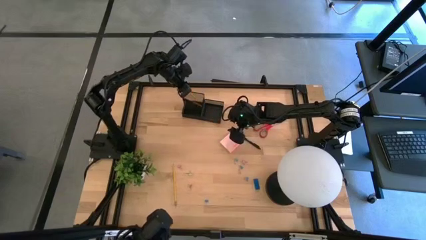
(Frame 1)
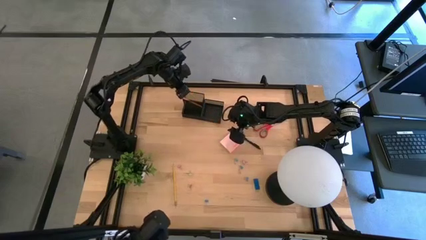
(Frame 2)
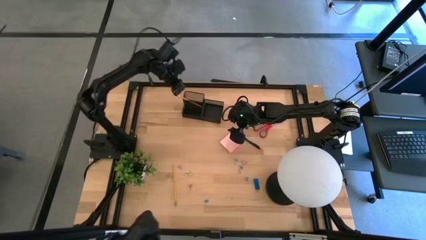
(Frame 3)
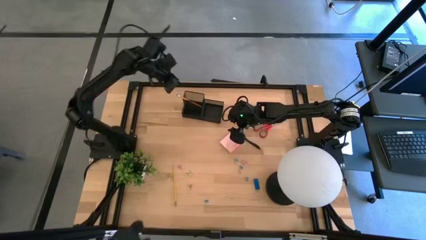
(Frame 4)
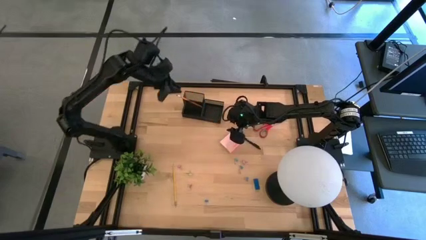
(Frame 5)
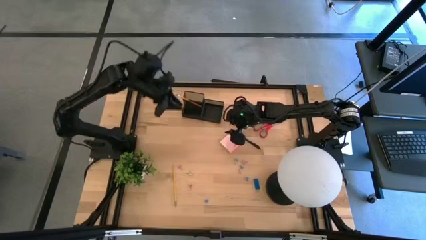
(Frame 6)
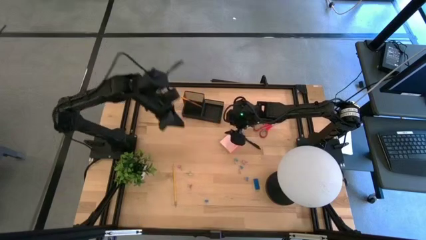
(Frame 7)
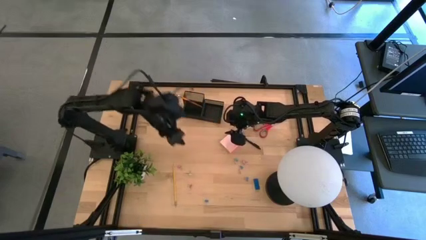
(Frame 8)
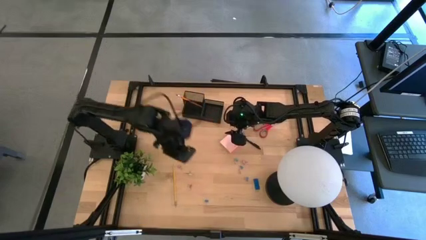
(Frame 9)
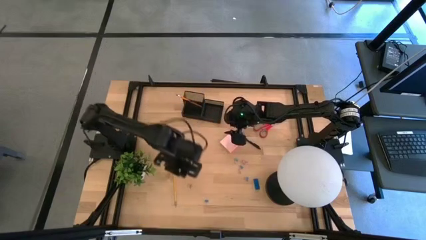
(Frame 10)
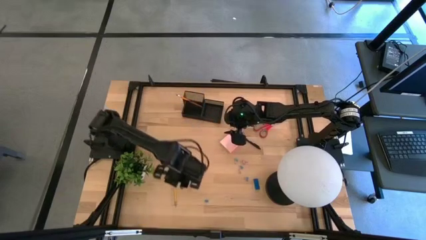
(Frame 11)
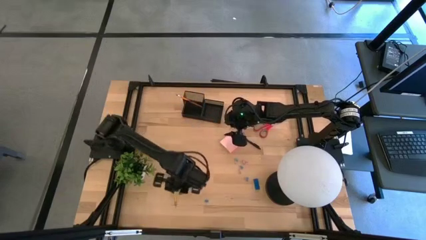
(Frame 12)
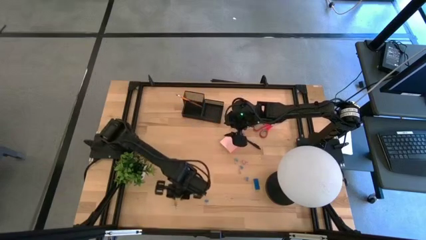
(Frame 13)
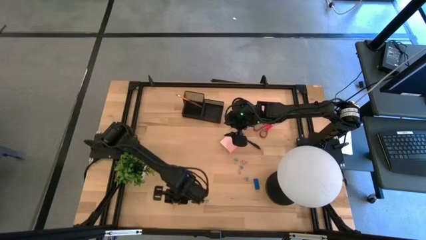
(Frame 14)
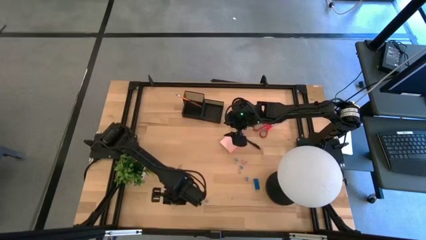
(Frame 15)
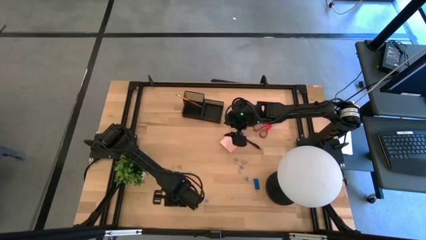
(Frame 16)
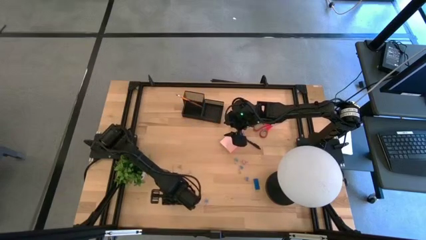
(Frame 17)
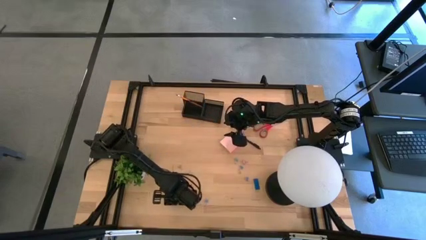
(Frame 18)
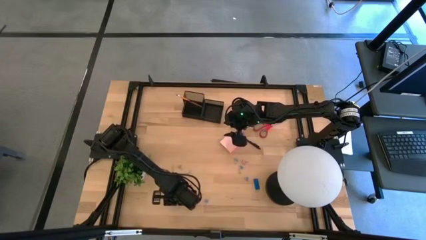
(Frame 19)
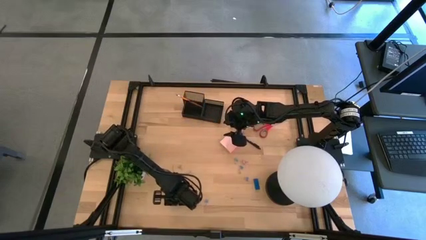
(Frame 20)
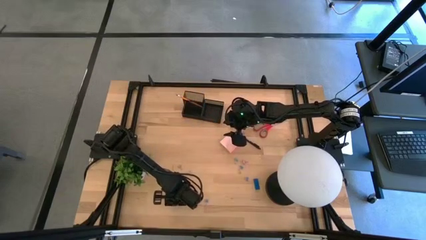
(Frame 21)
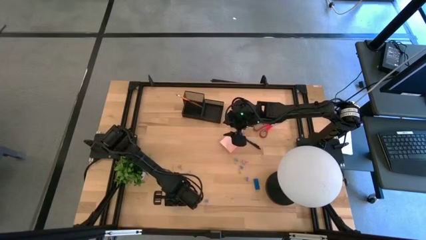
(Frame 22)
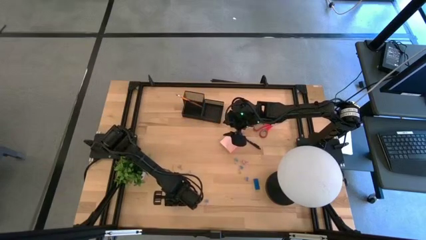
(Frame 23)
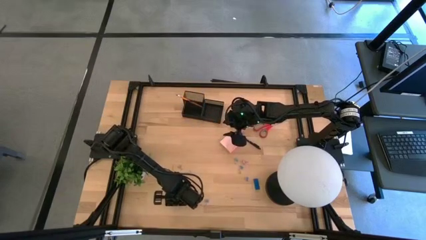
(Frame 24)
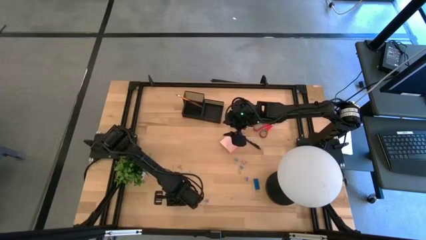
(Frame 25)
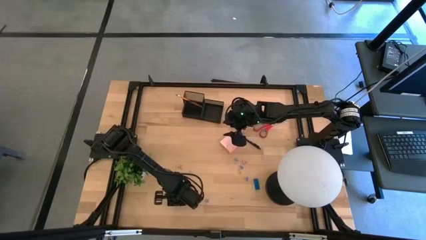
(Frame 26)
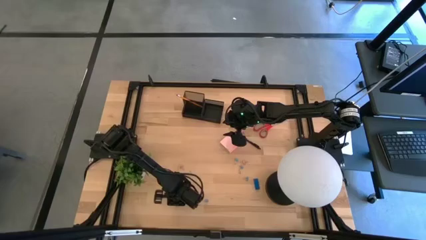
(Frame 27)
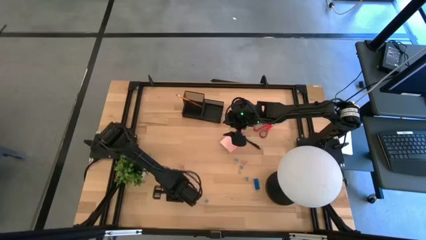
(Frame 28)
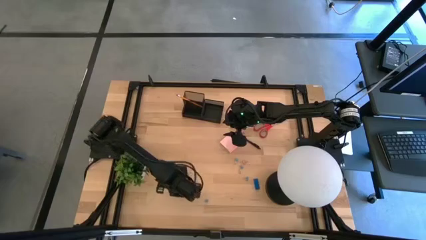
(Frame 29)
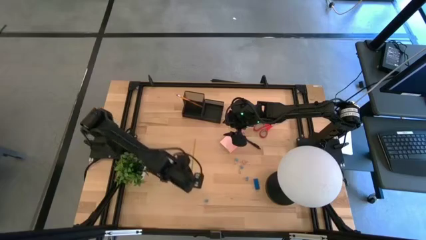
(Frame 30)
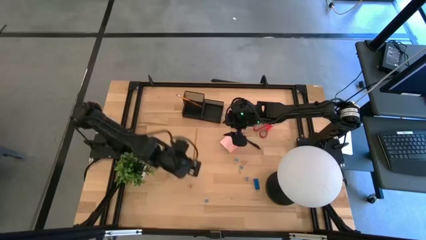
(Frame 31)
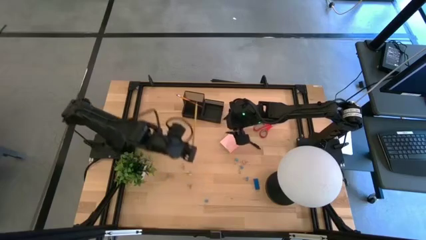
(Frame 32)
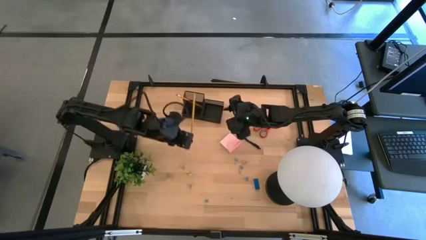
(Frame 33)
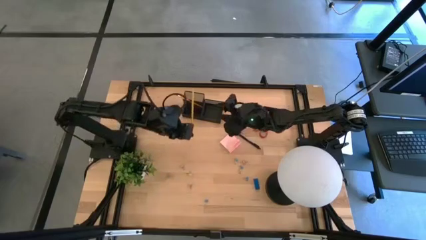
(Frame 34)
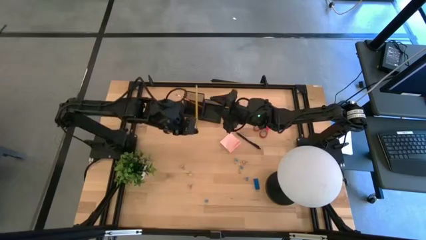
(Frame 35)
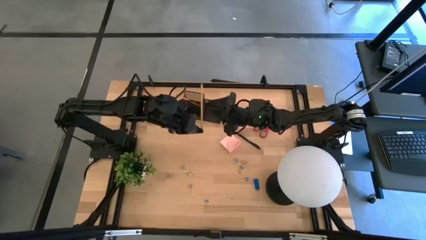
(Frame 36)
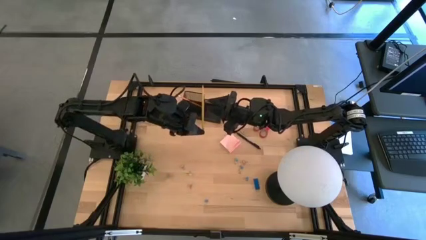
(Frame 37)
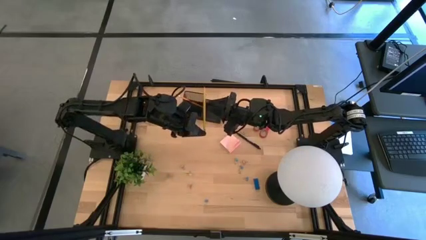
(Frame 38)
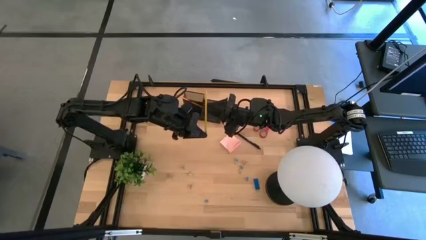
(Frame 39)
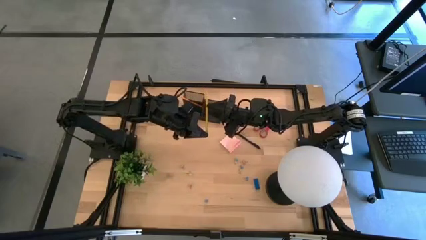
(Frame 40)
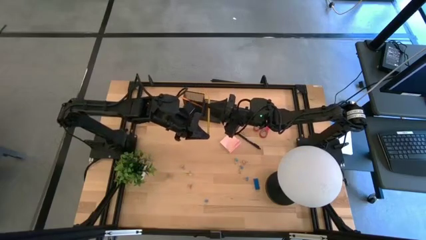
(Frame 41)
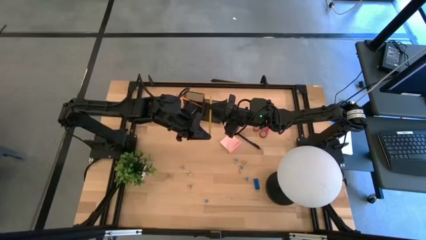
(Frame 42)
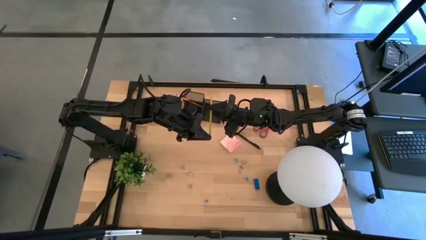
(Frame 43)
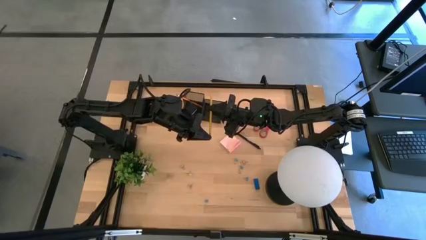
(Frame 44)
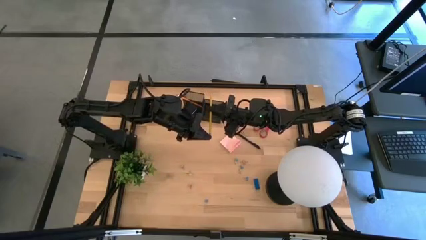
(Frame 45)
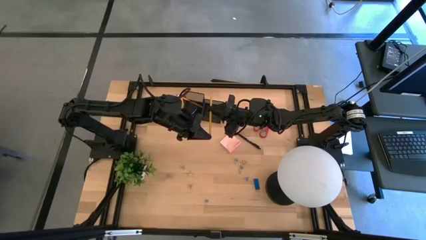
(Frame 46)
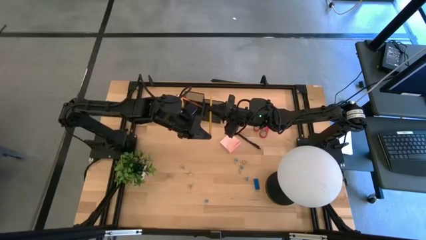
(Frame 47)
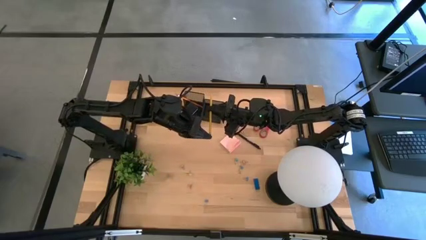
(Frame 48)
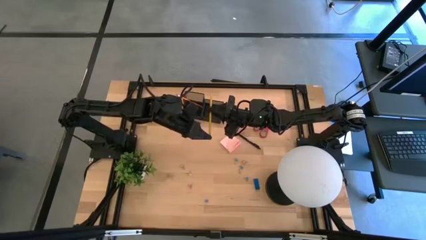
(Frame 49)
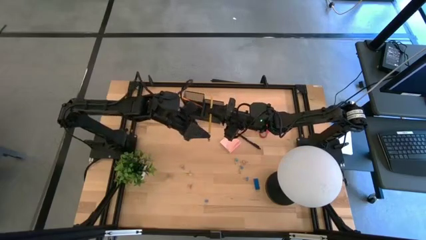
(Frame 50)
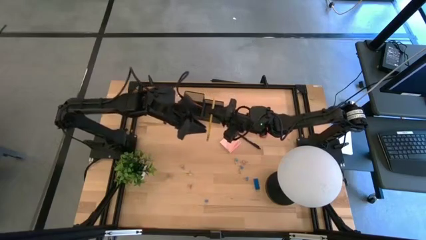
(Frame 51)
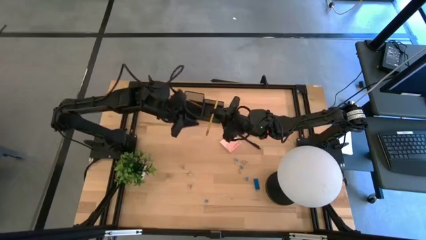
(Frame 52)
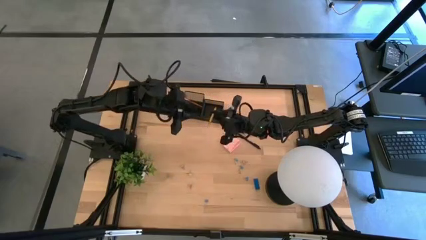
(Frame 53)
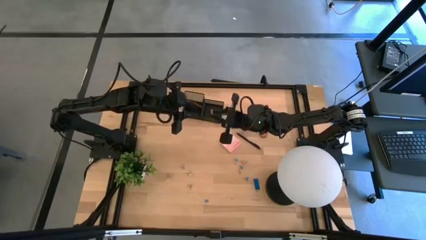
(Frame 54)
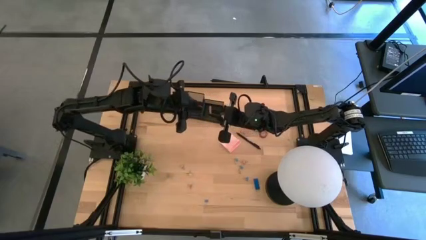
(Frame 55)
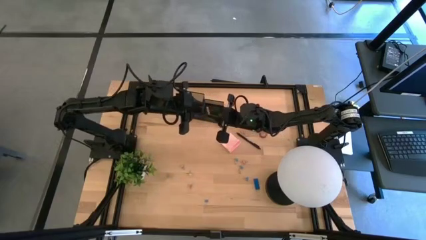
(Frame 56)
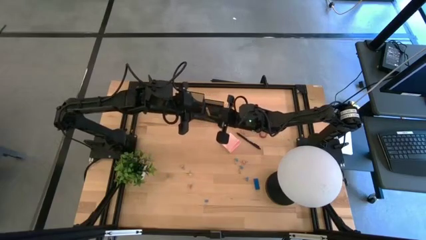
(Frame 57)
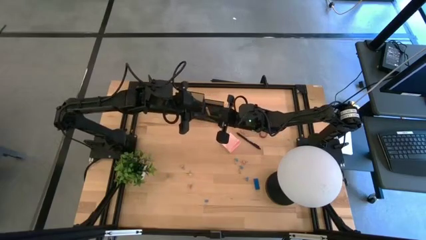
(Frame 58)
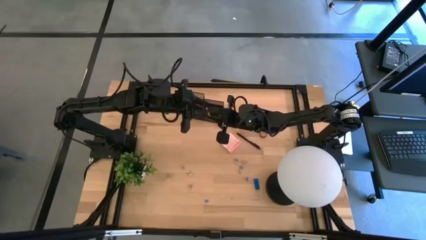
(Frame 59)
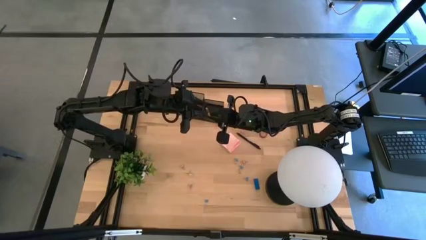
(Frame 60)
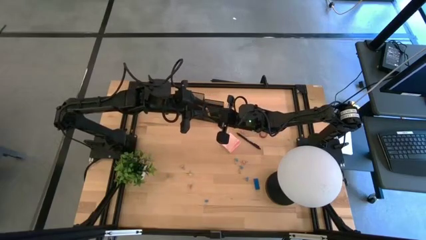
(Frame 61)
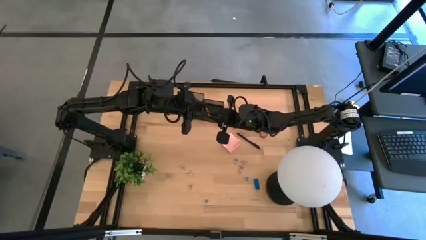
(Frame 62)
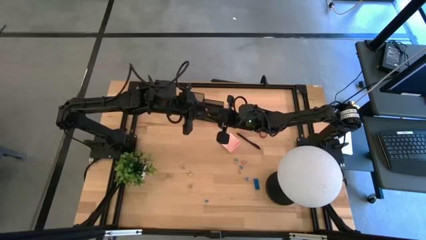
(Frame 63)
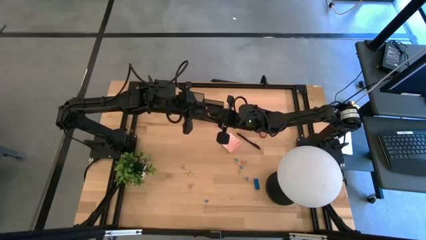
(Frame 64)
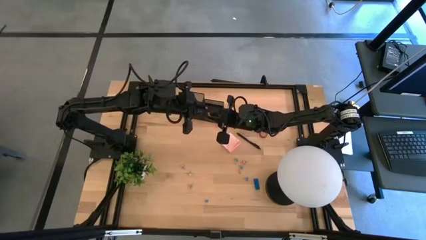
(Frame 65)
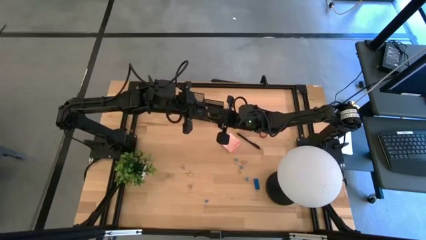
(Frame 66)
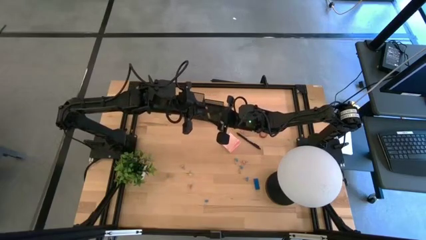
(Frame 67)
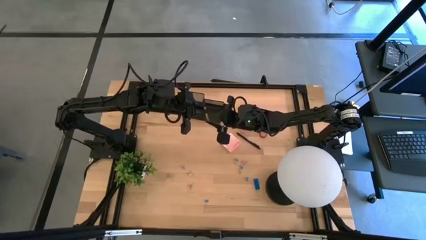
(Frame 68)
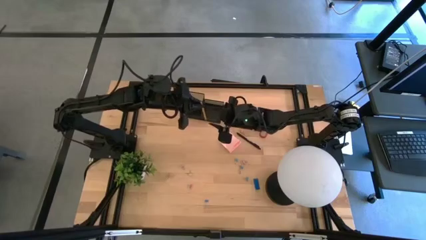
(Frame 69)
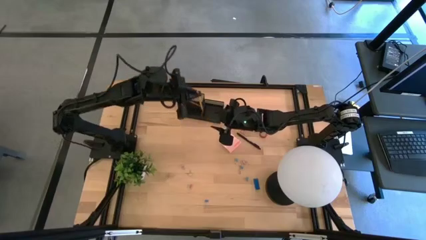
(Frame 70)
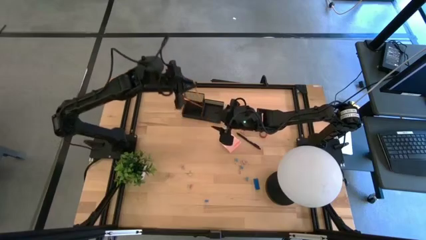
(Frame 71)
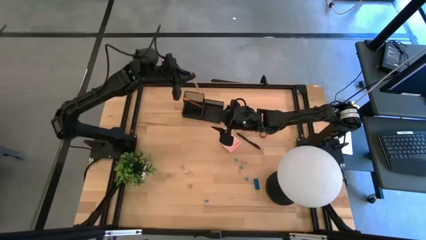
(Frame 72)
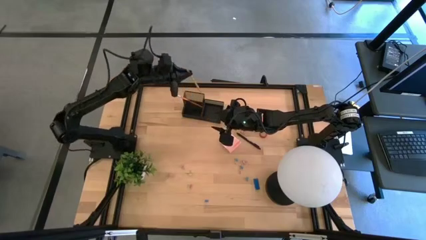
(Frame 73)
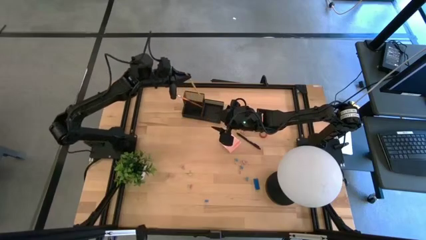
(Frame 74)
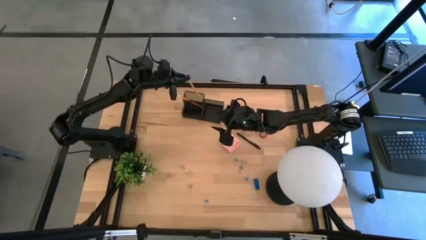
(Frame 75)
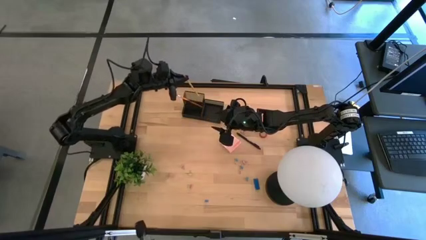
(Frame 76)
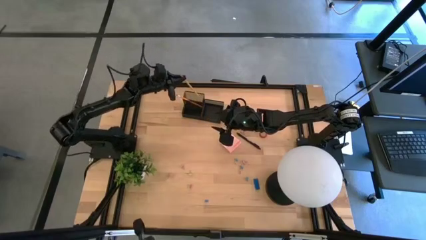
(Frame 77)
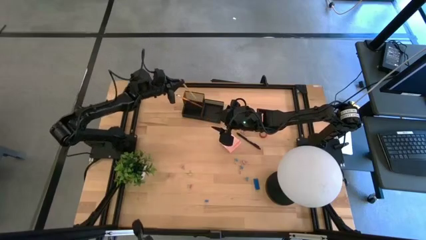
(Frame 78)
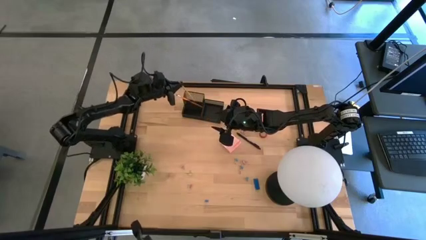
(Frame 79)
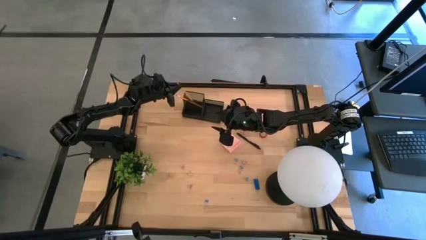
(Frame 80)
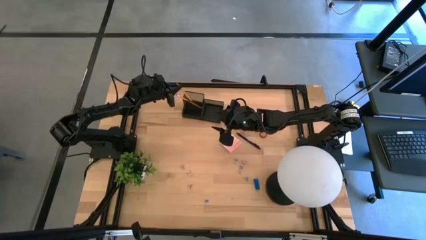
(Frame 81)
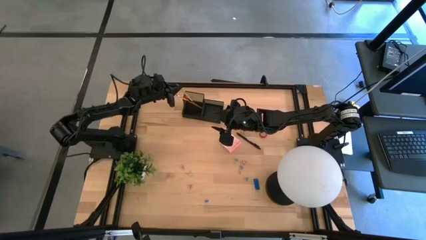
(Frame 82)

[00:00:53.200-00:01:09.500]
Task: Pick and place office supplies into organizer
Put the yellow pencil into the black desk organizer
